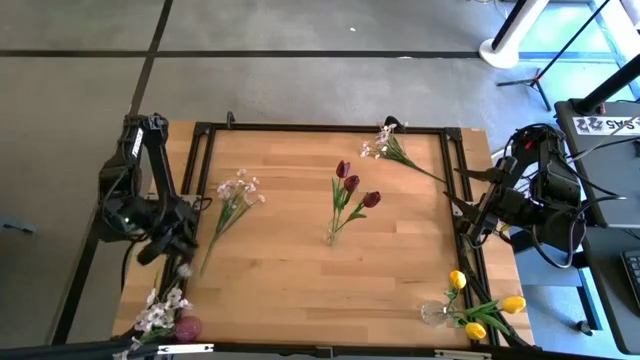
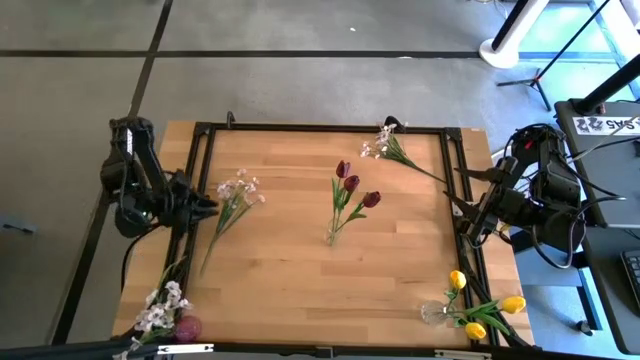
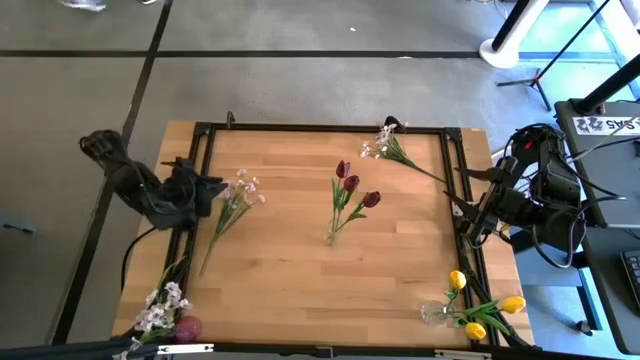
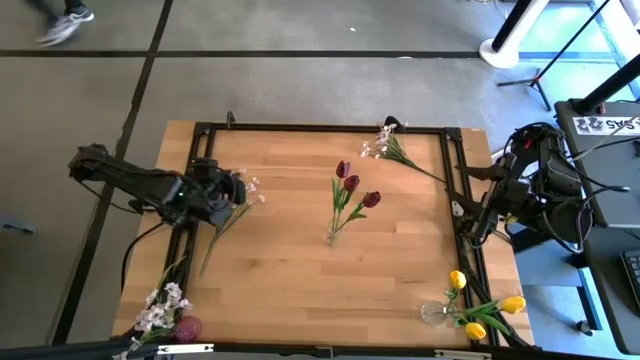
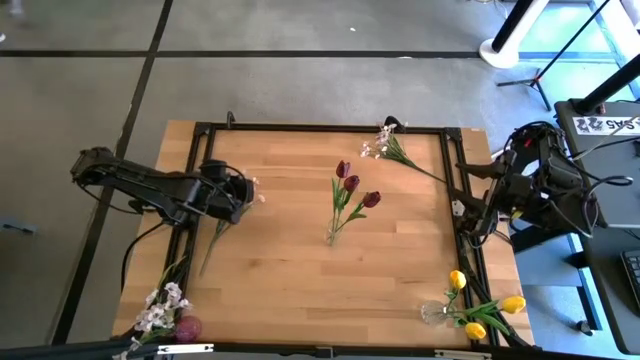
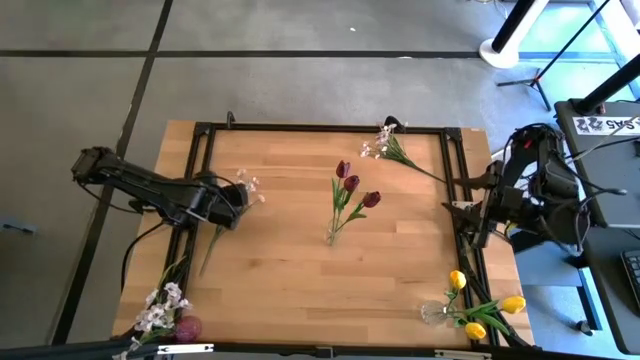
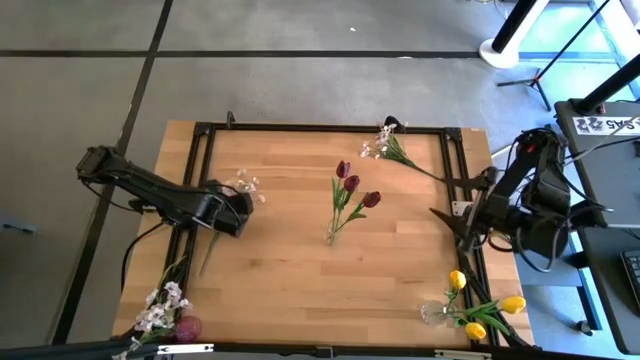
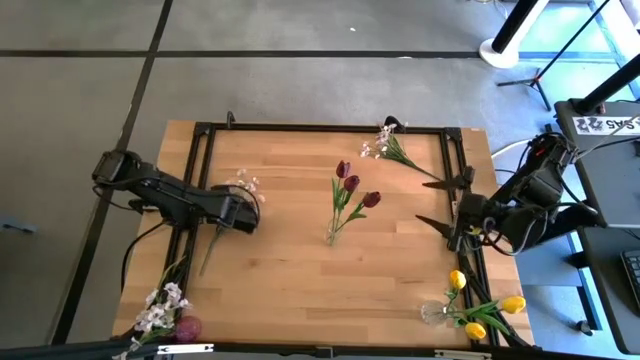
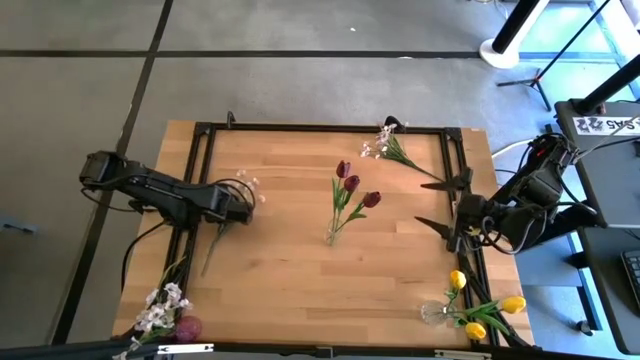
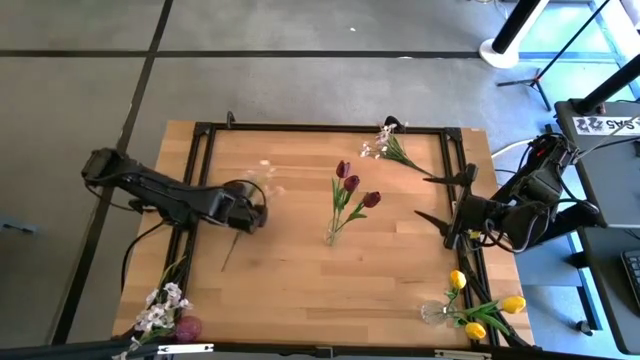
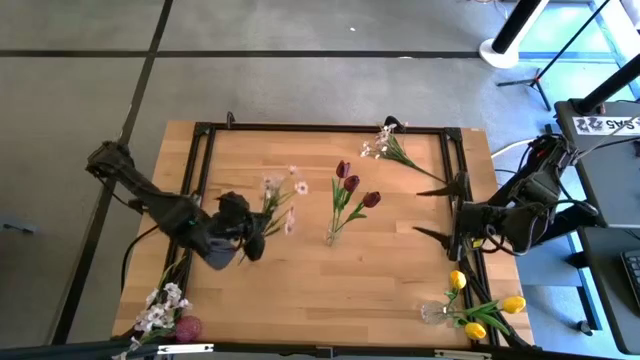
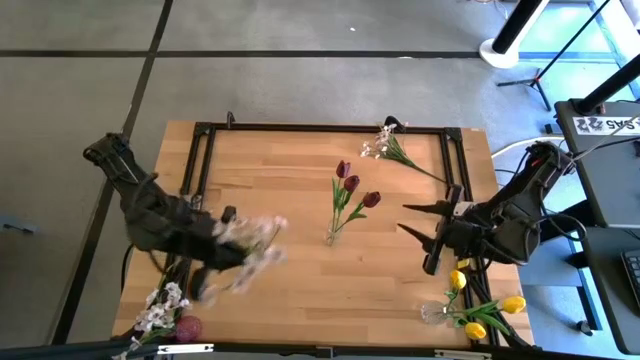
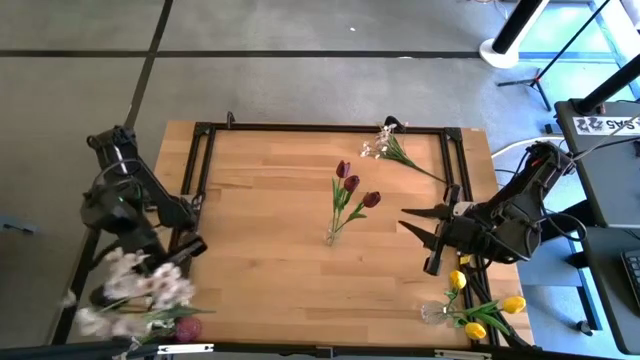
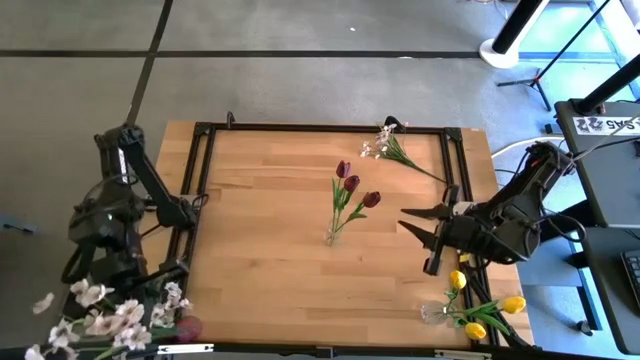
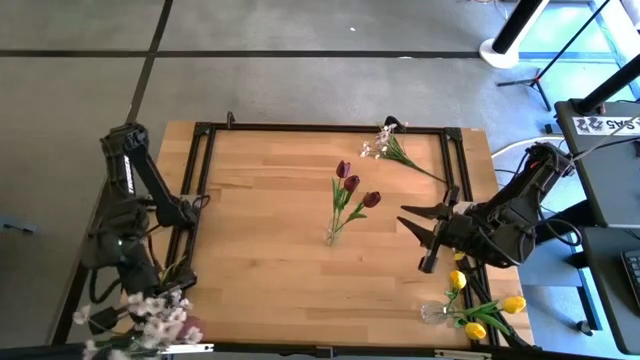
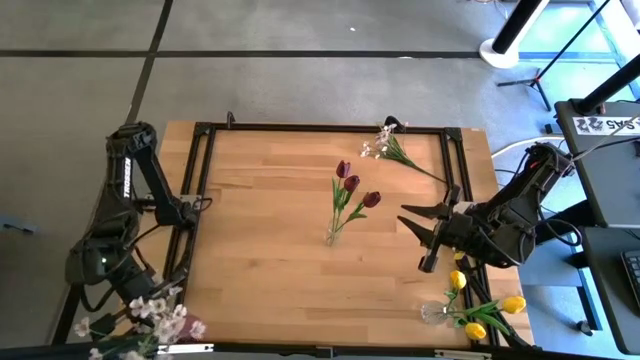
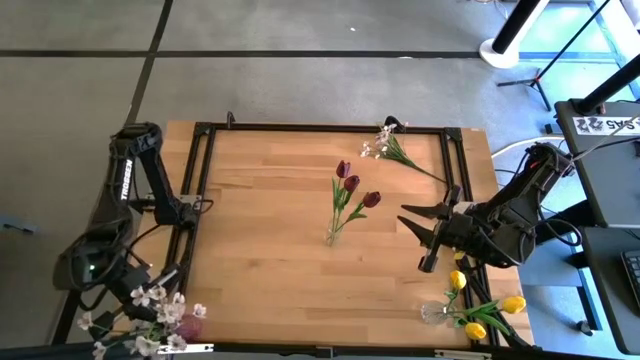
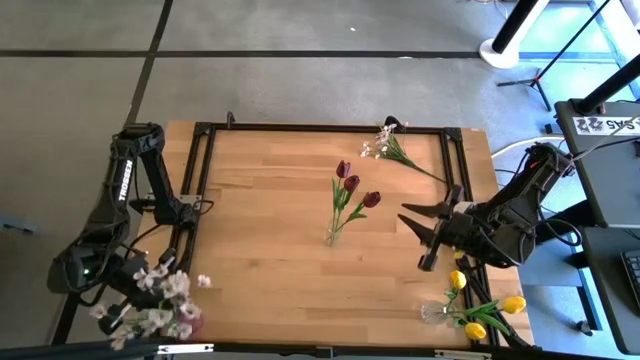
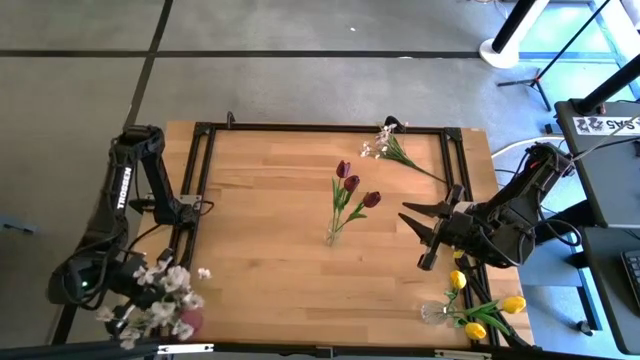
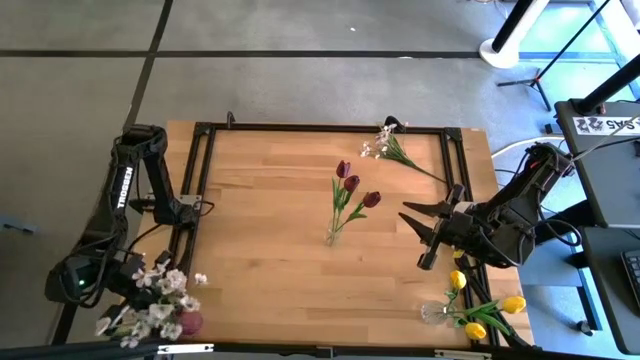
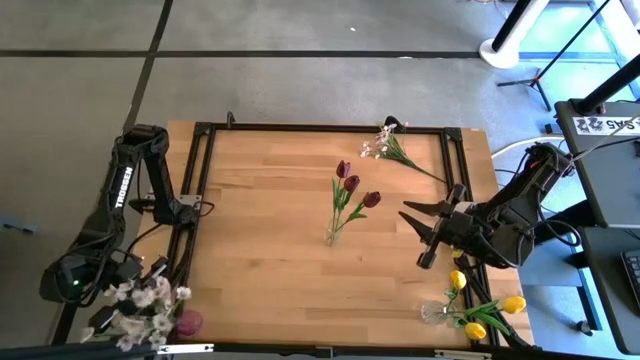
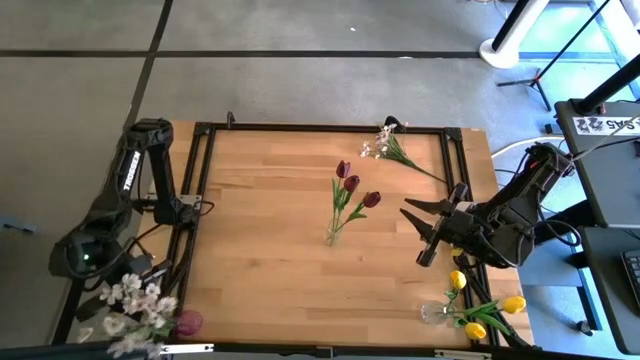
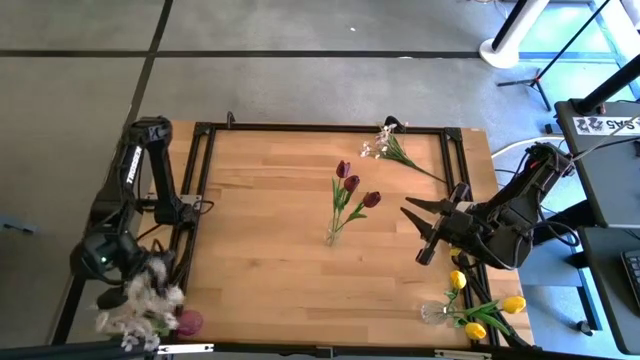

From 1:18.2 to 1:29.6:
Task: Sort flowers into vase by color
Put the bottom white flowers into the purple vase

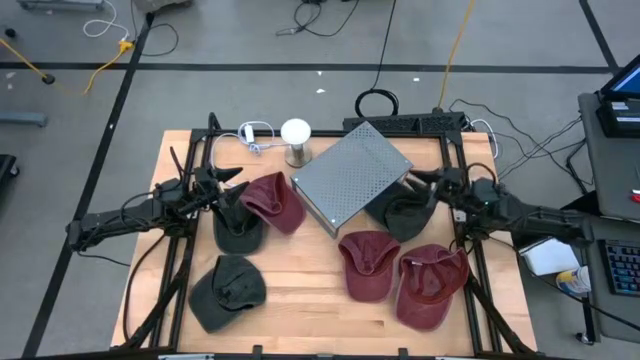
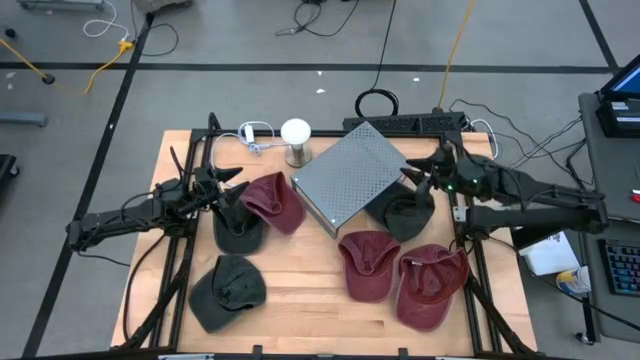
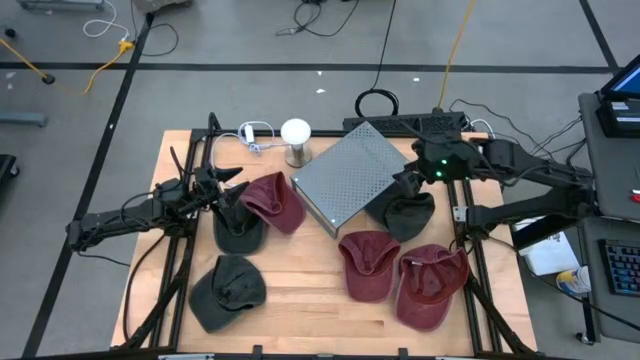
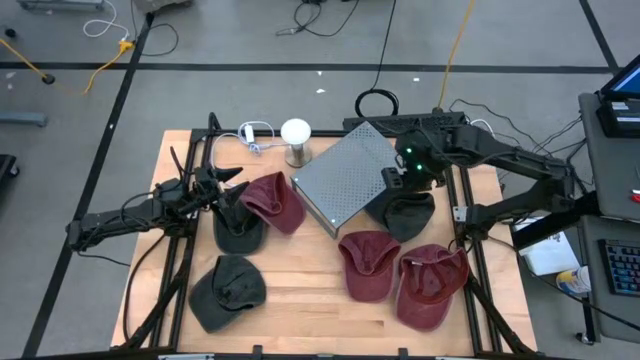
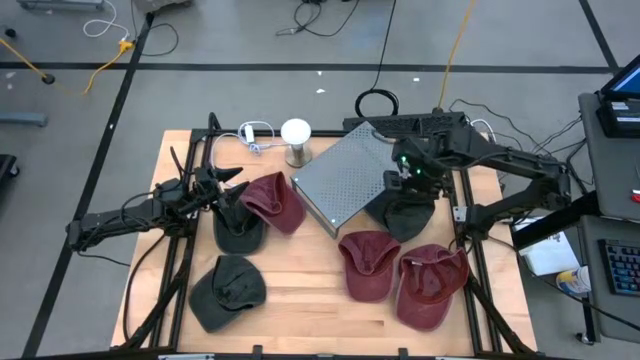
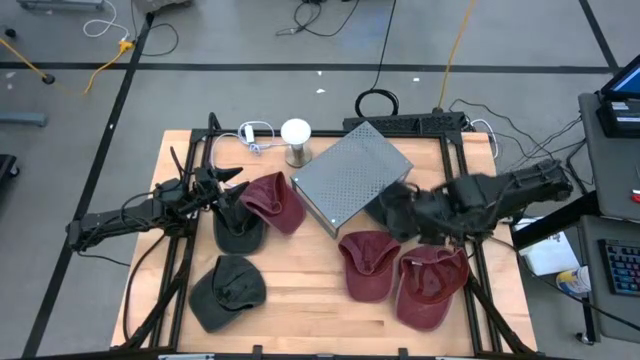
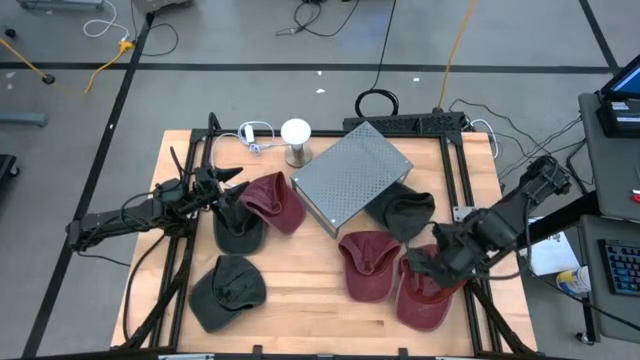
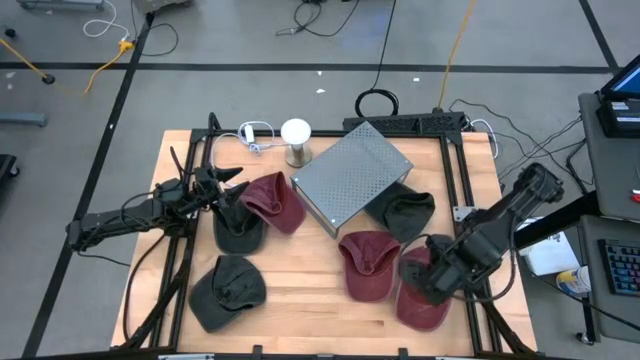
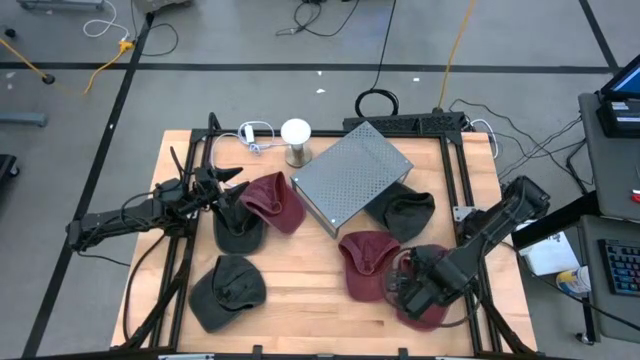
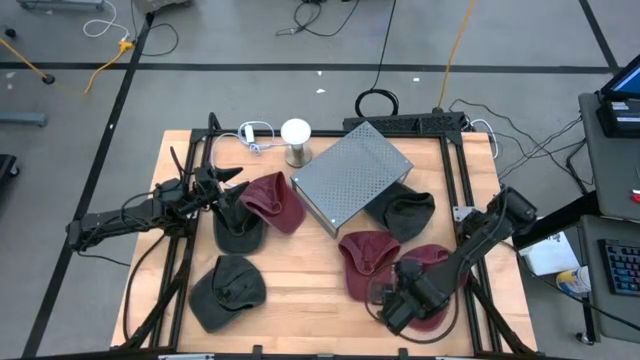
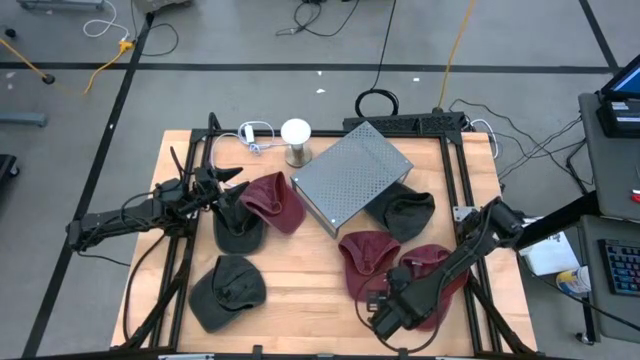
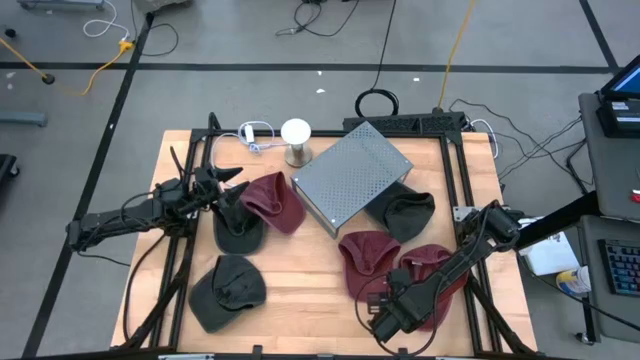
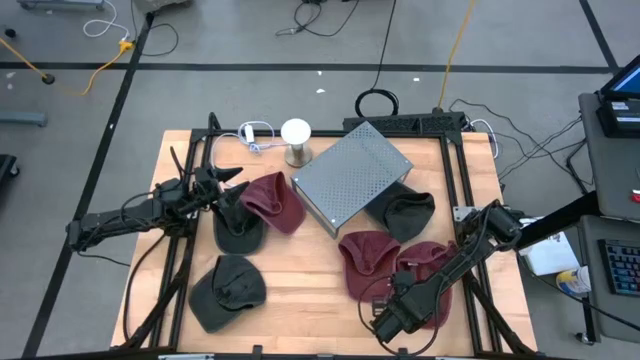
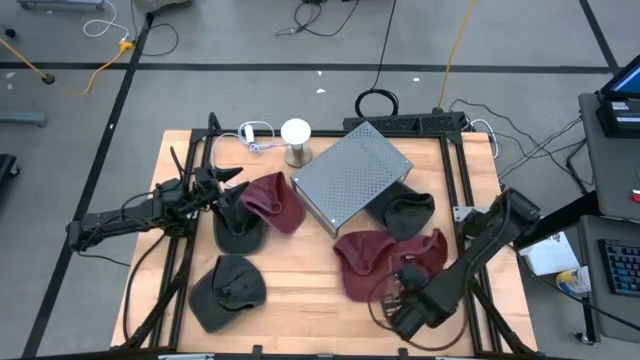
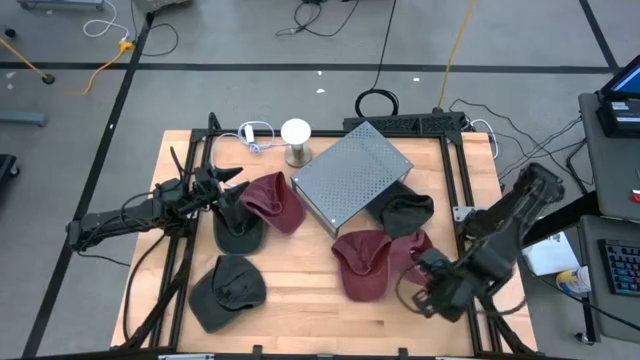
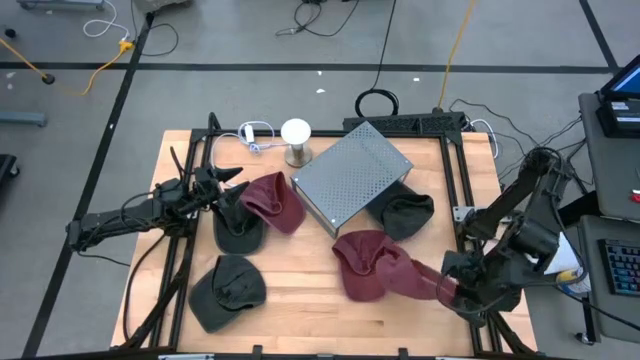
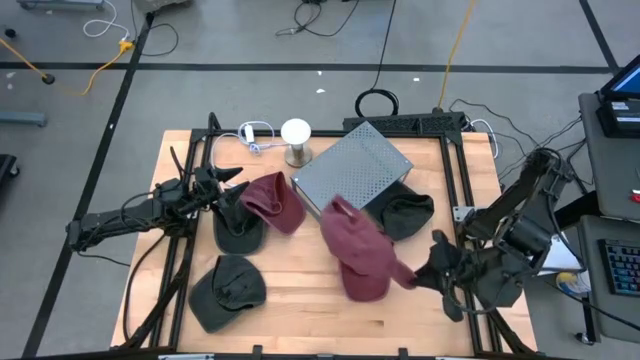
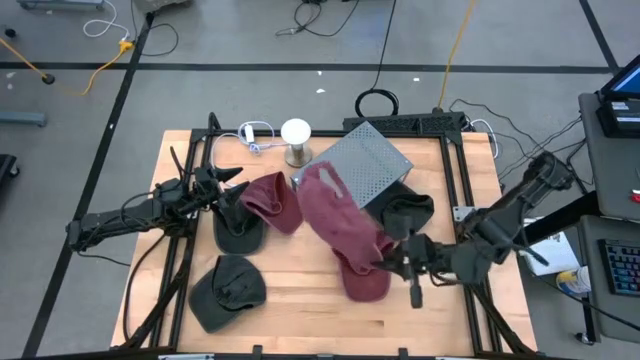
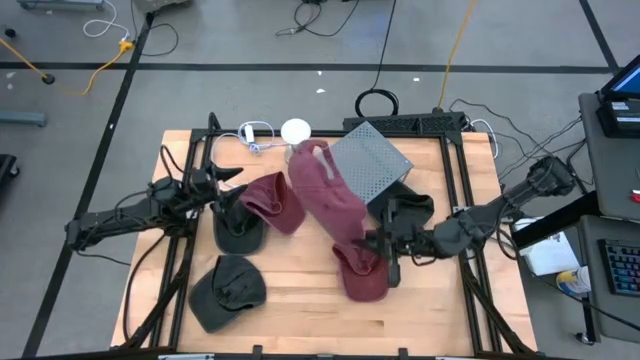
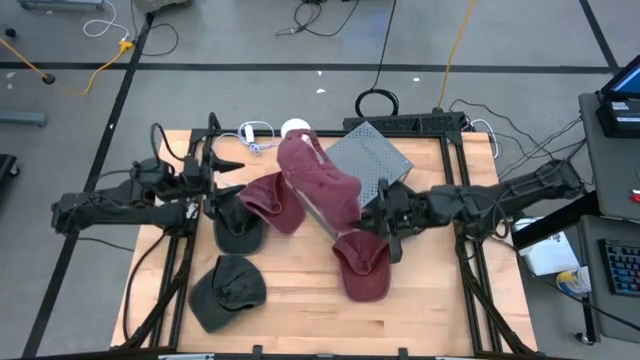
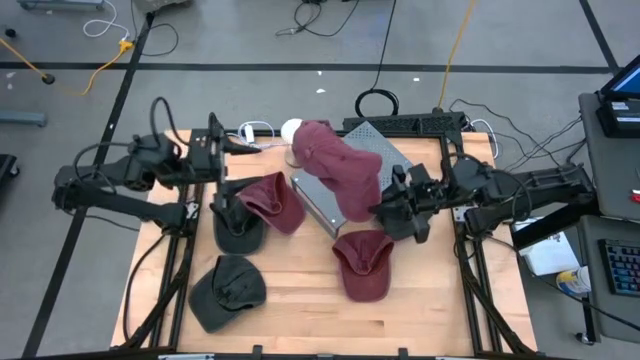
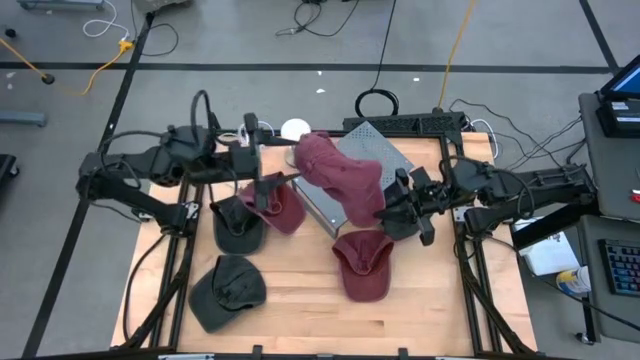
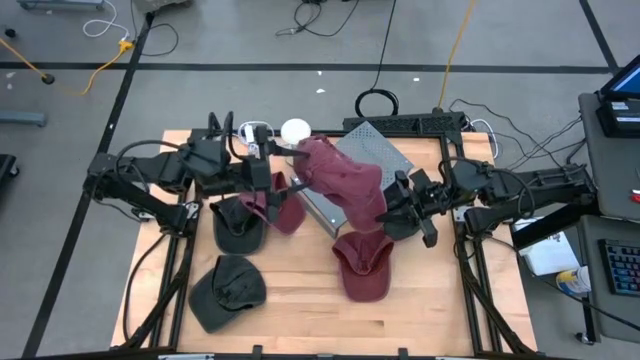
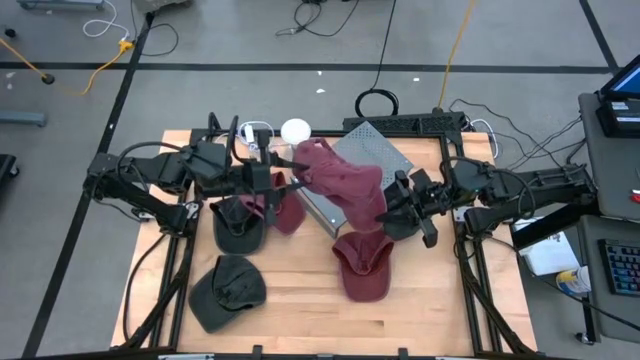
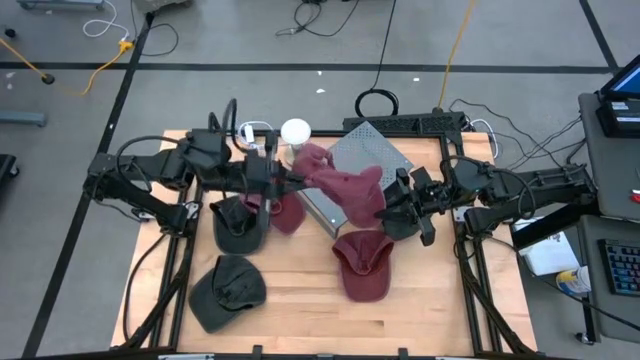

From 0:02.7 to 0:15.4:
Task: Pick & Place hat
Put the right red cap on the shelf
